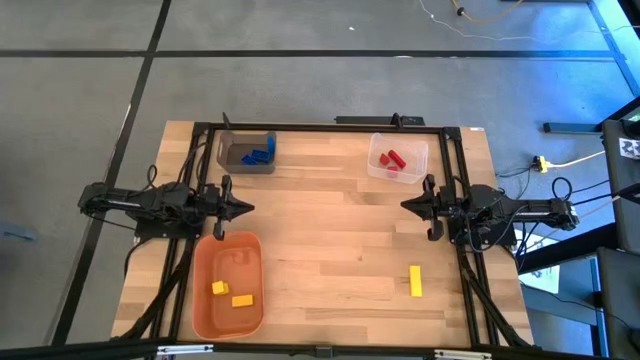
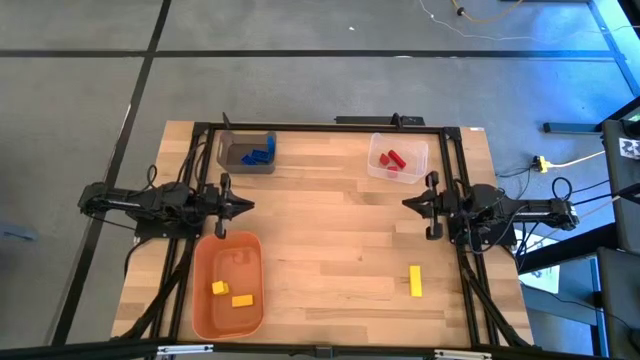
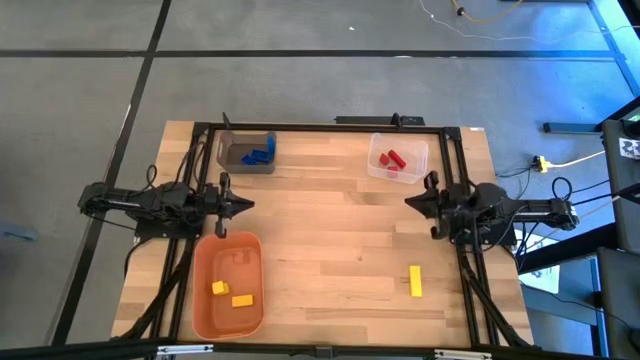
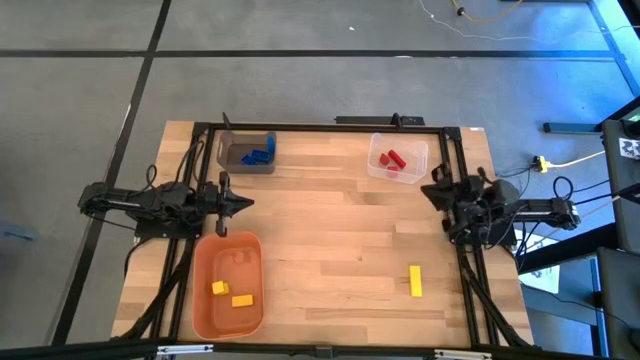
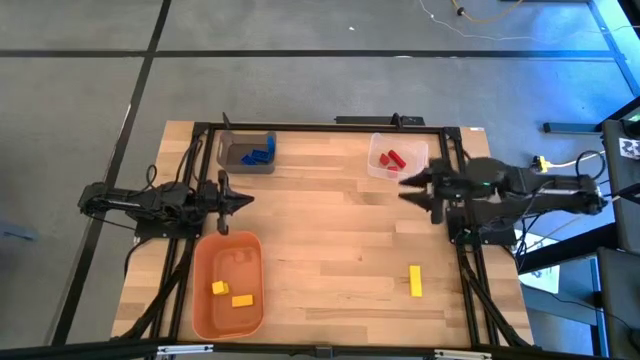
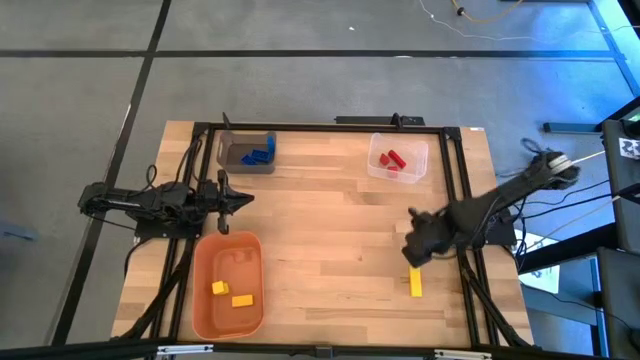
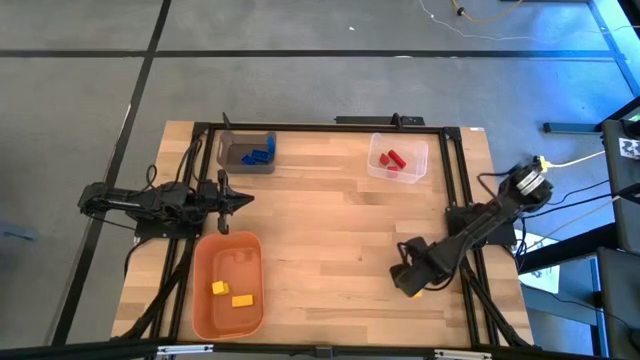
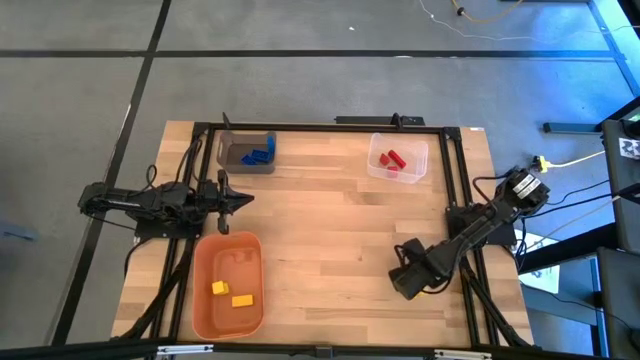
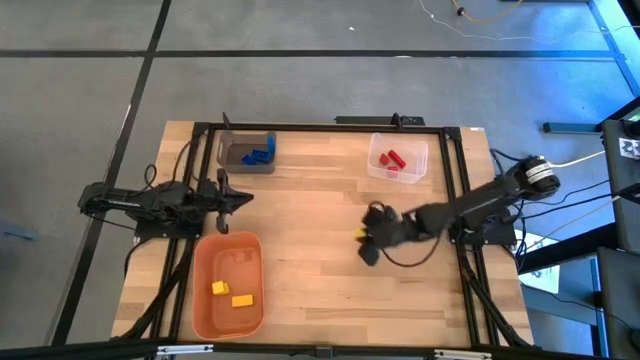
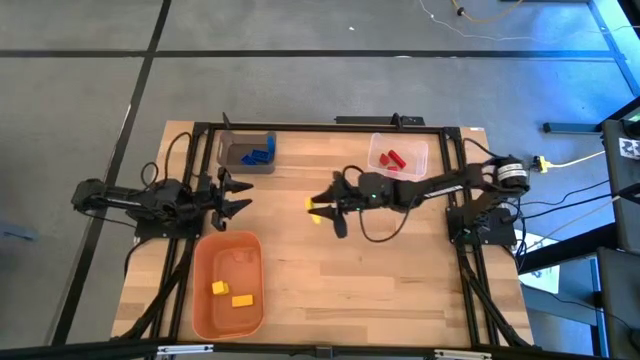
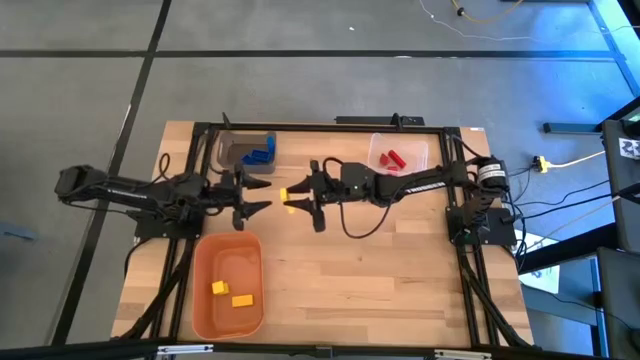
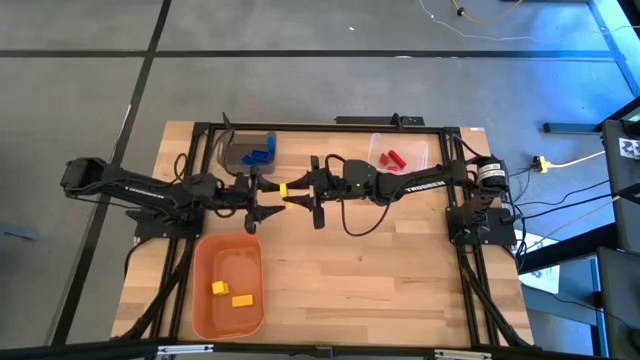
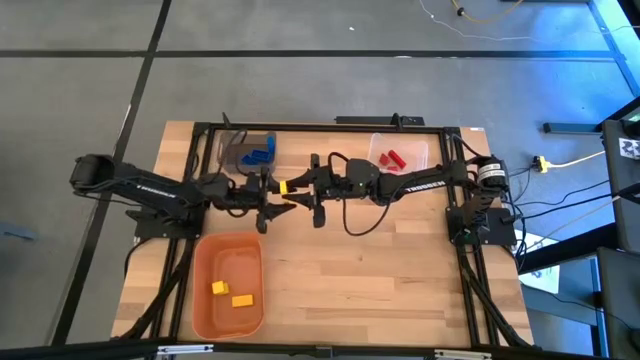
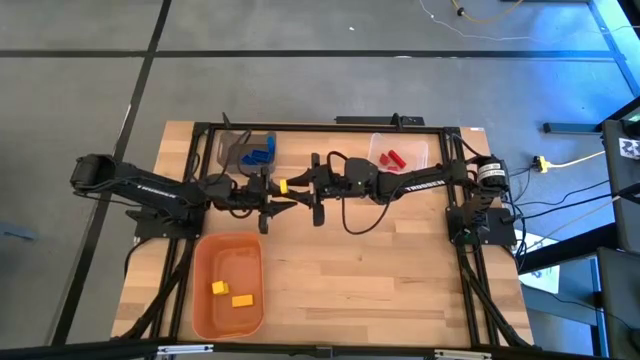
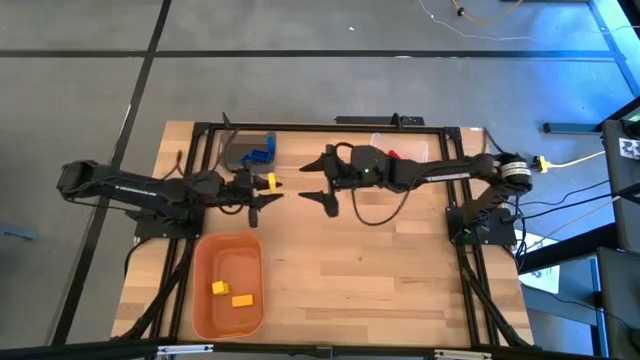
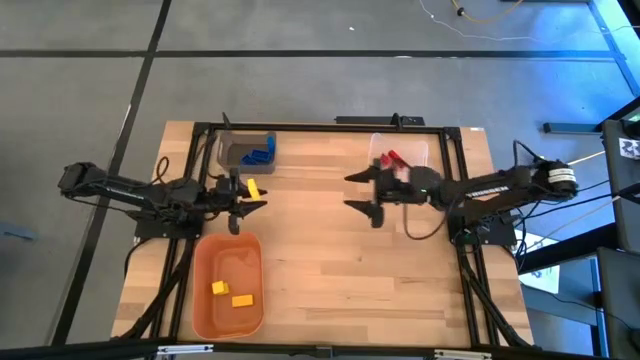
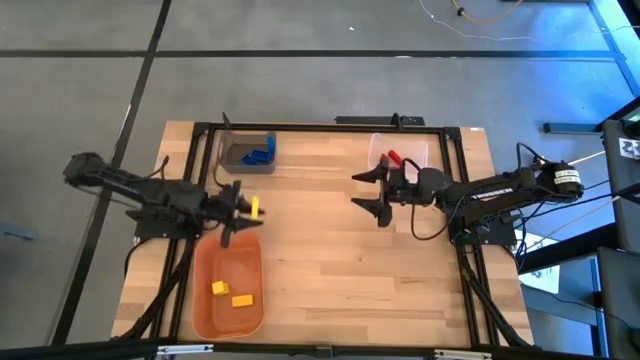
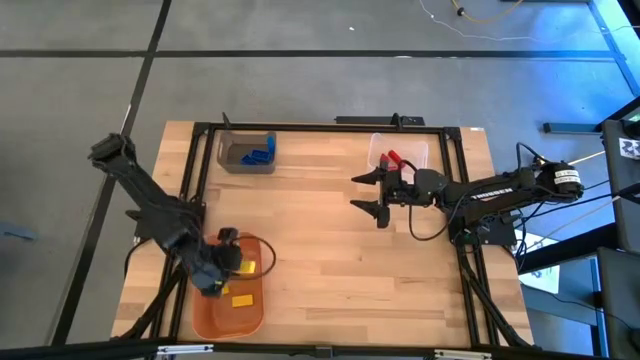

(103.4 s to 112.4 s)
Task: Sort & place blocks by color
Put the yellow block into the orange bin

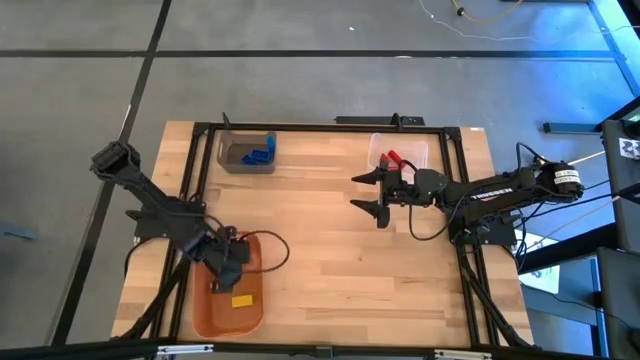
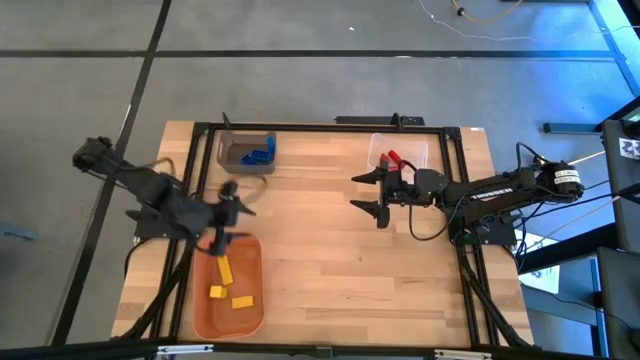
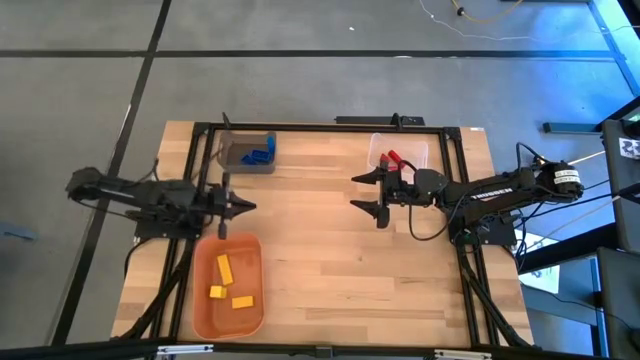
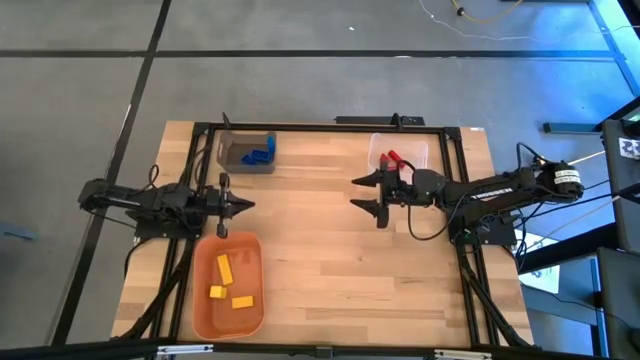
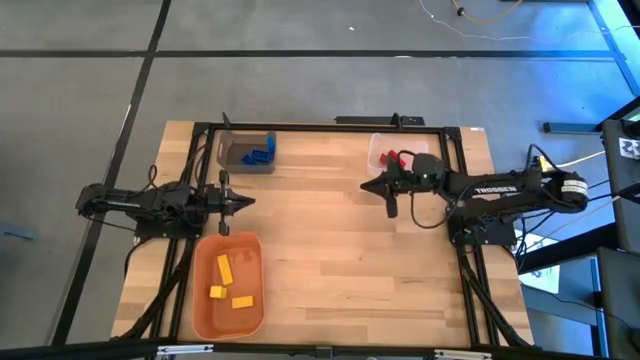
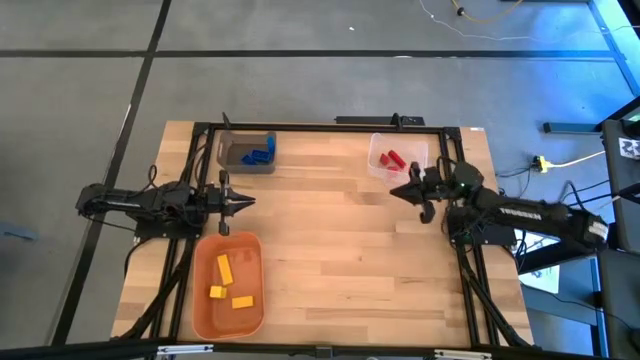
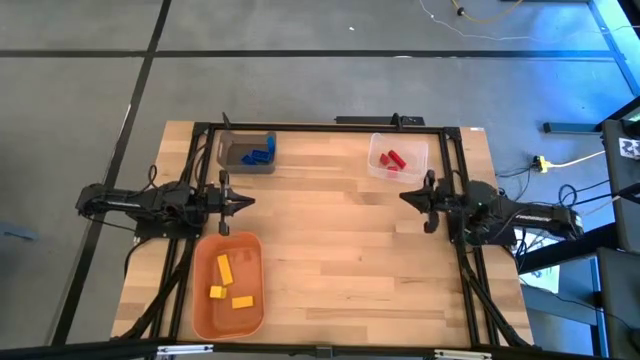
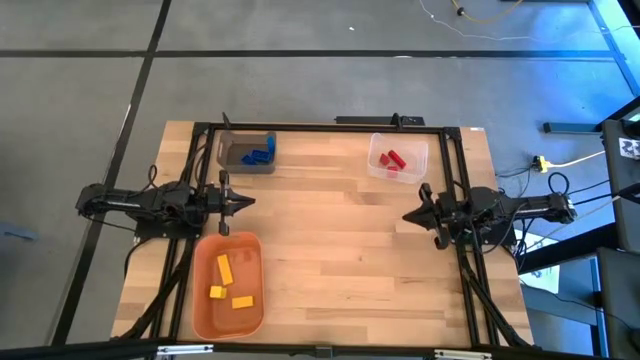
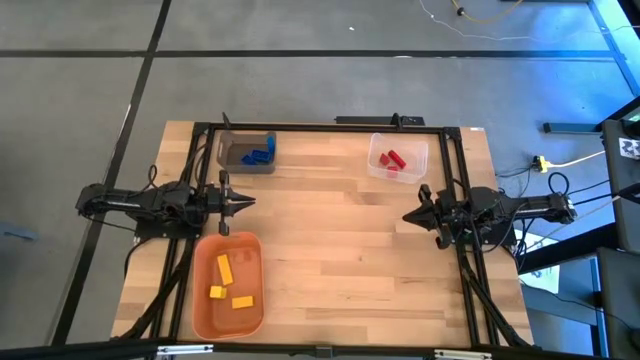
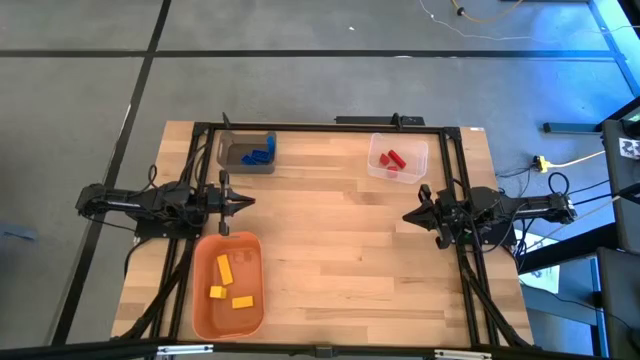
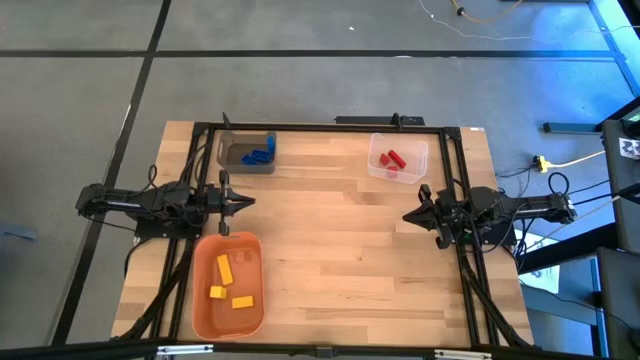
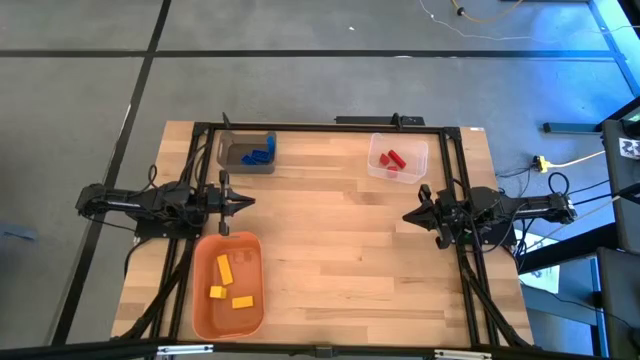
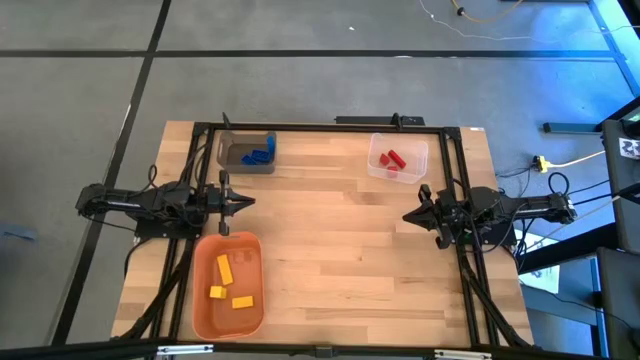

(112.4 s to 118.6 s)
Return to Home Position

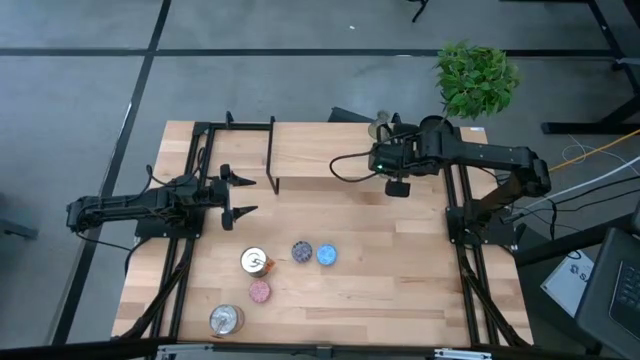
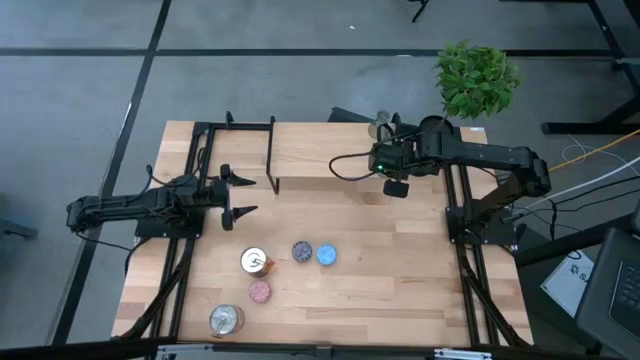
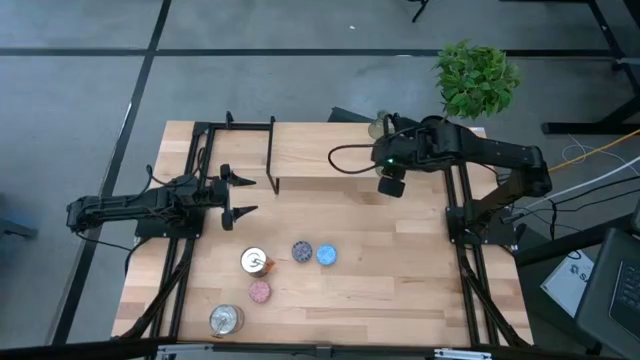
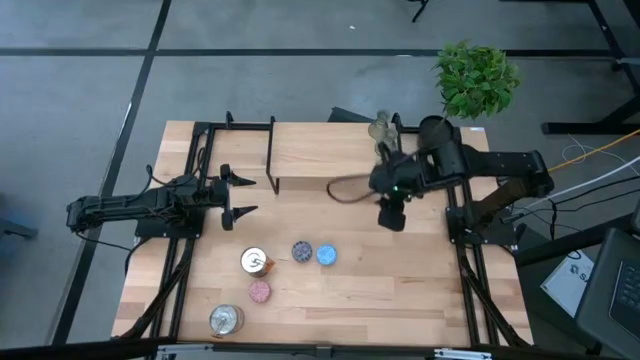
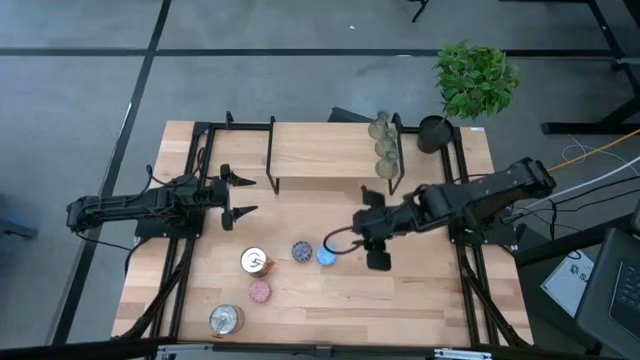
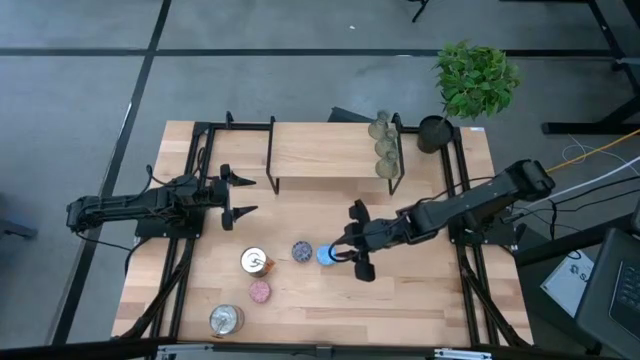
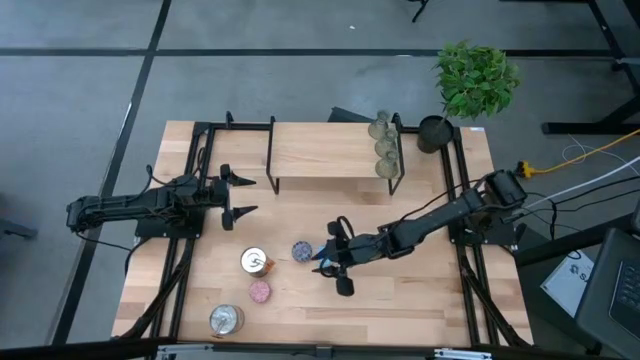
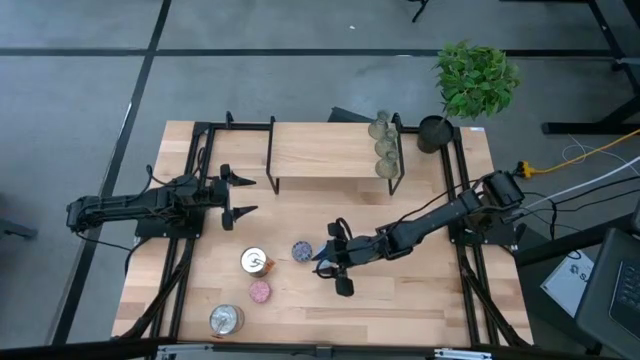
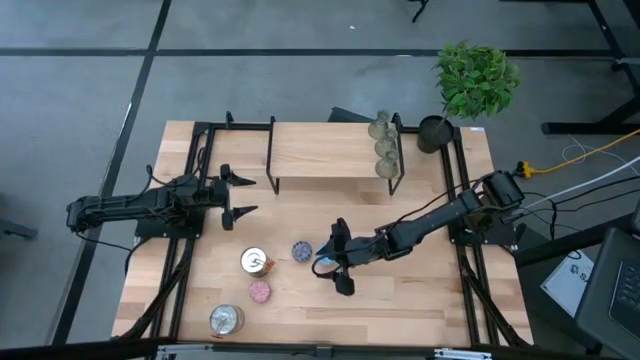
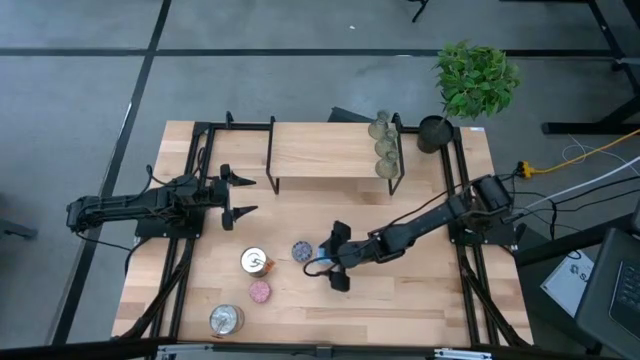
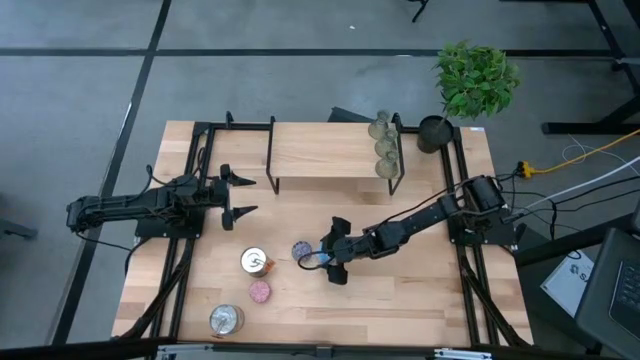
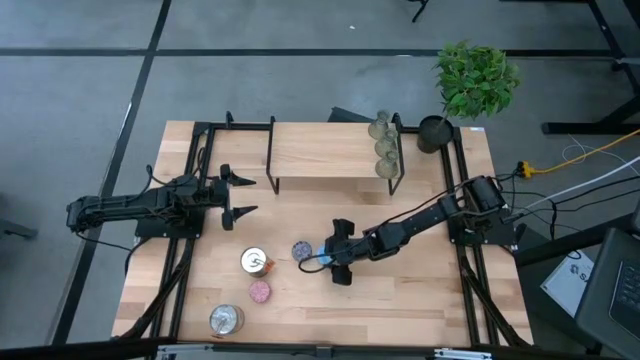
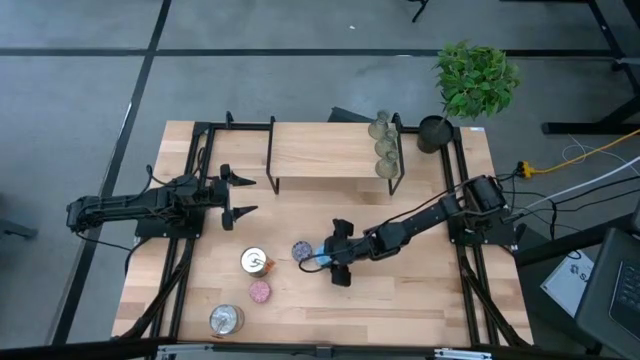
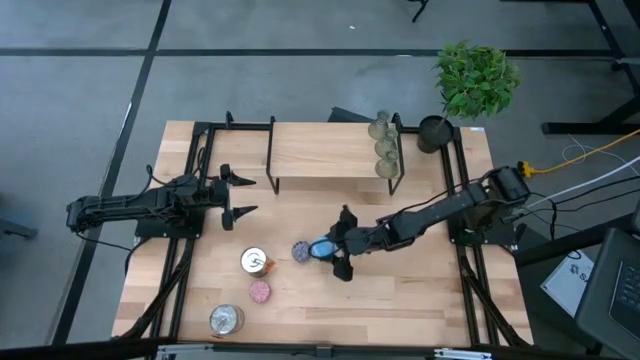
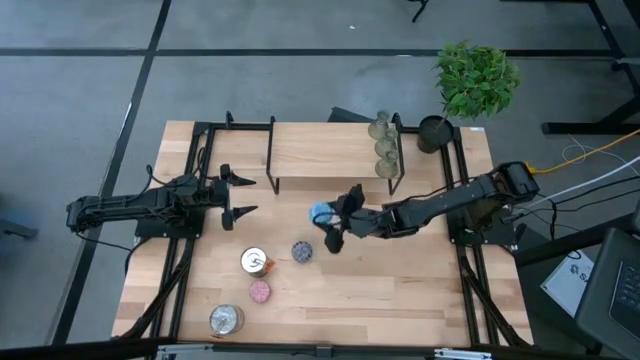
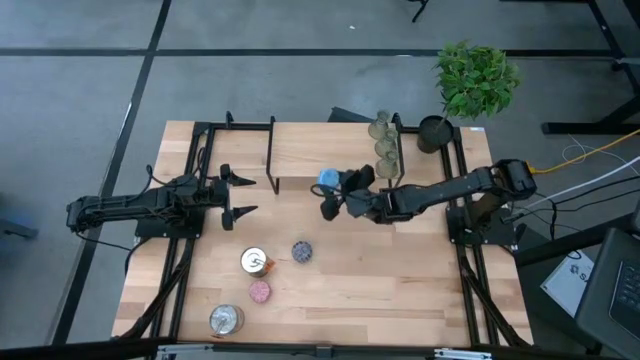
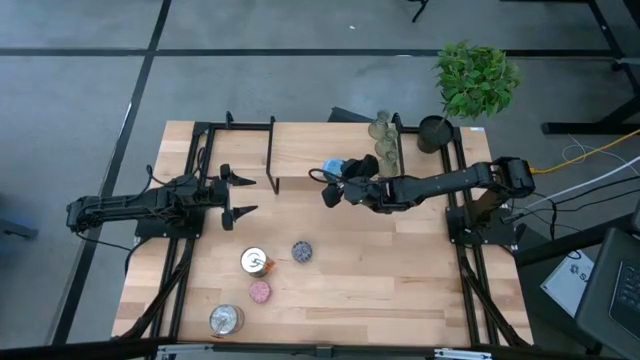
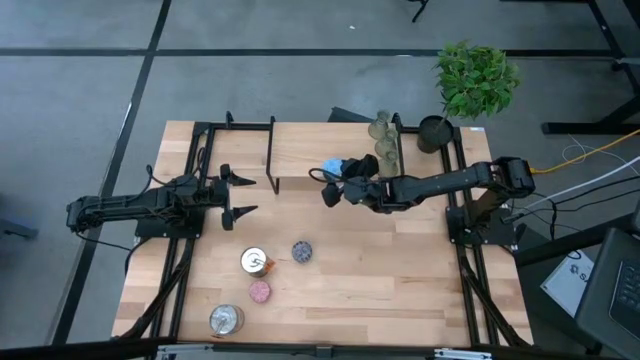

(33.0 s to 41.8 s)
Task: Pick & Place candle stick holders
Put the patterned blue scented candle on the shelf
